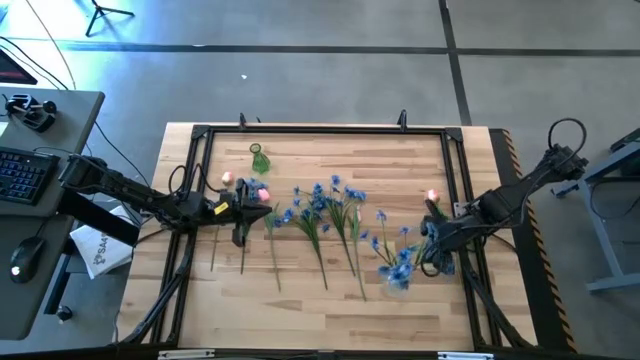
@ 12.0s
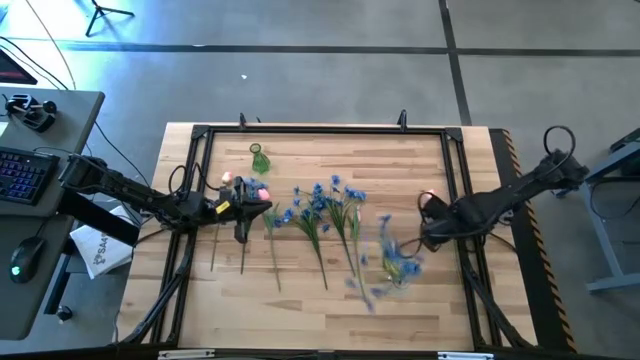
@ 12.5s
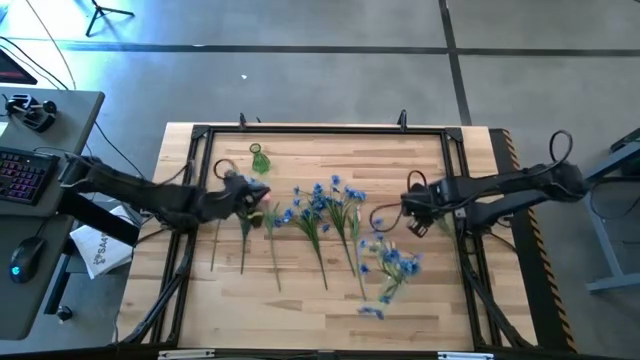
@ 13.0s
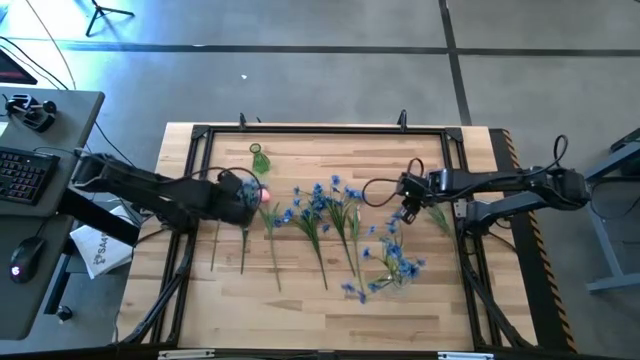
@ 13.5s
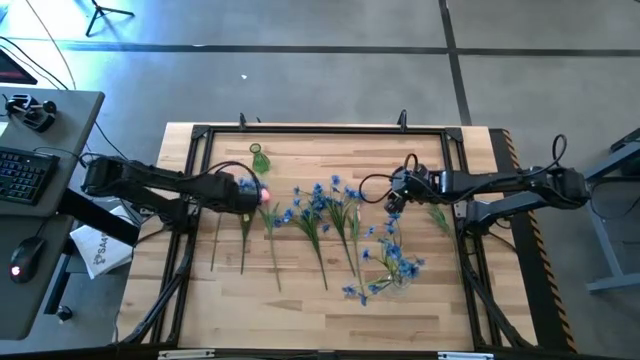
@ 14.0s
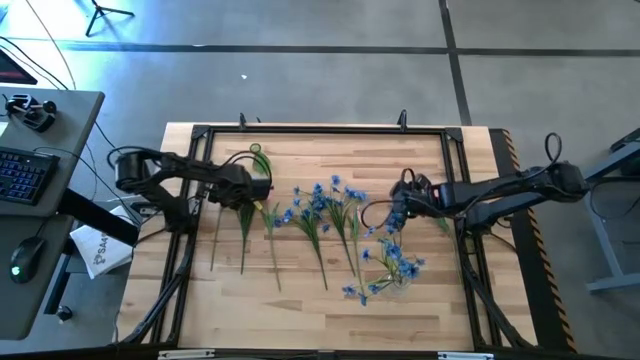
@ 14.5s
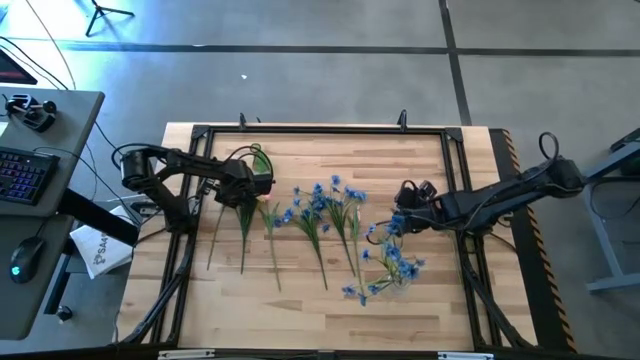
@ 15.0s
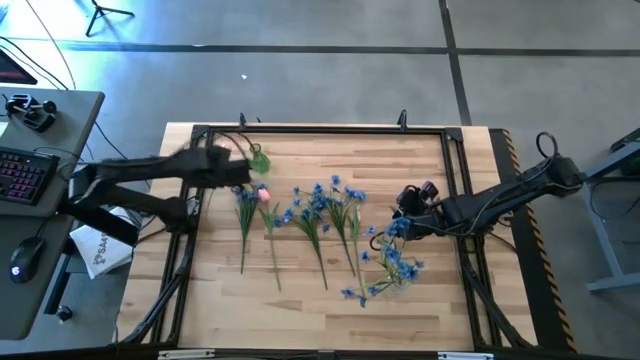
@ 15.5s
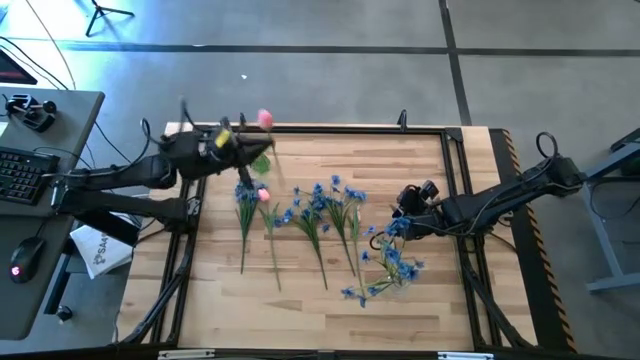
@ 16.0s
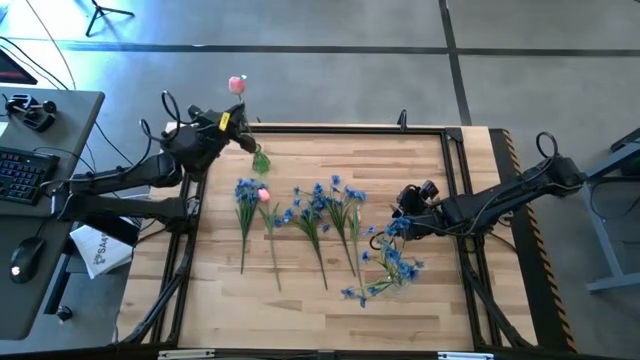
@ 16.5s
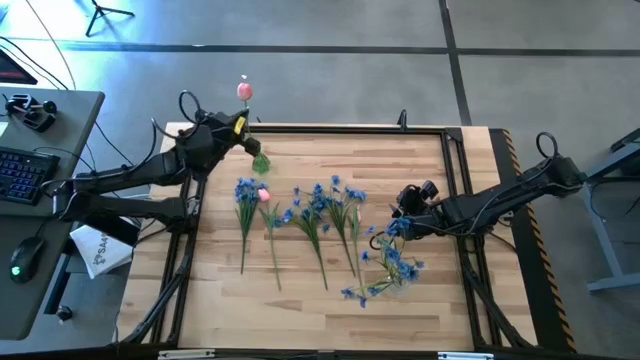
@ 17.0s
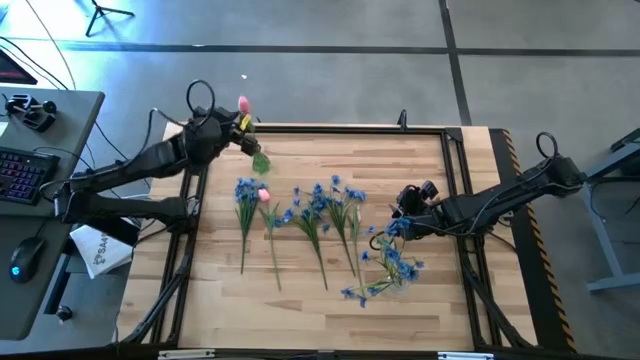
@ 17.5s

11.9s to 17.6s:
Task: Sort flowers into vase by color
Put the left pink tulip into the green vase

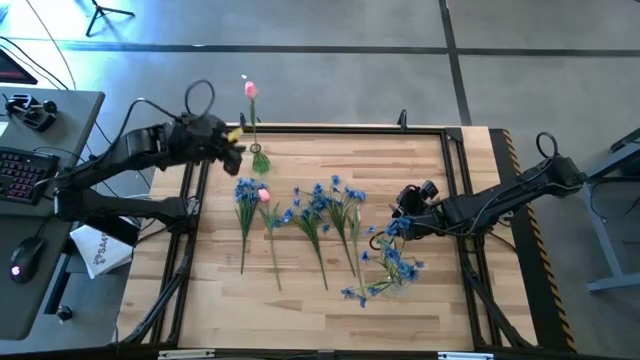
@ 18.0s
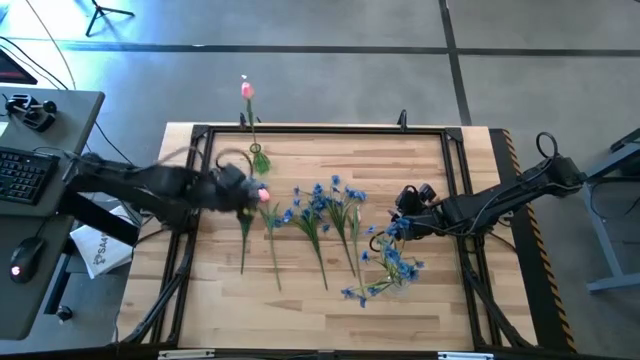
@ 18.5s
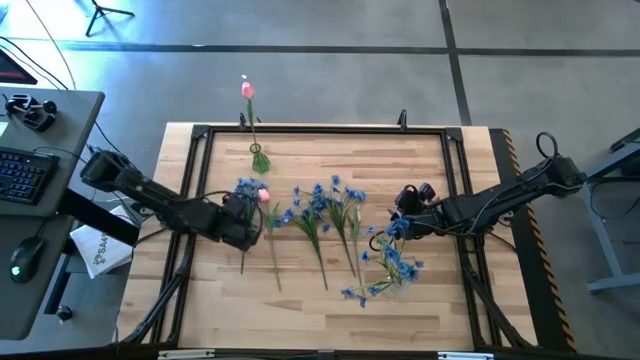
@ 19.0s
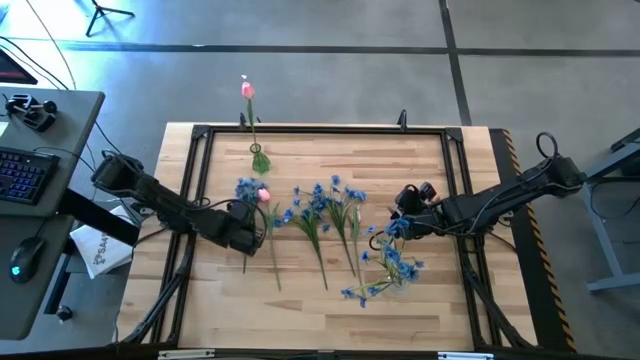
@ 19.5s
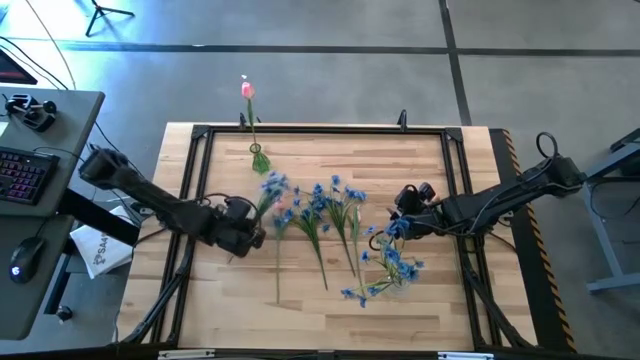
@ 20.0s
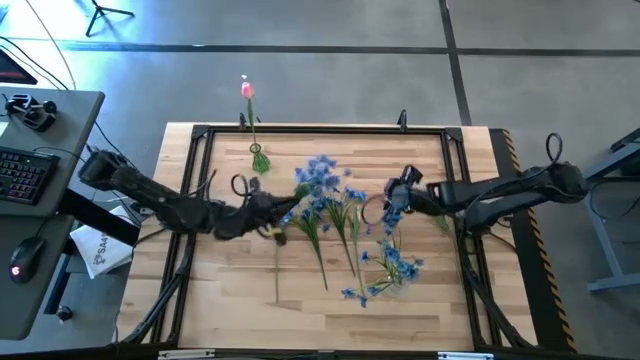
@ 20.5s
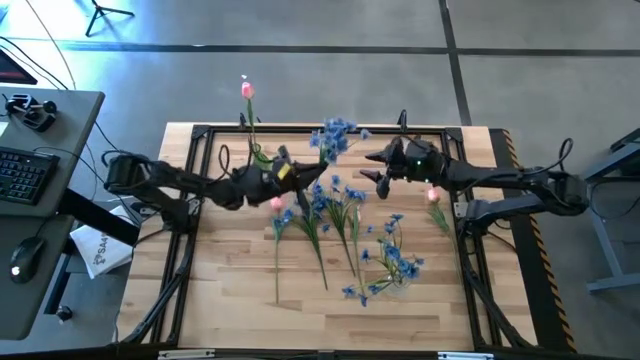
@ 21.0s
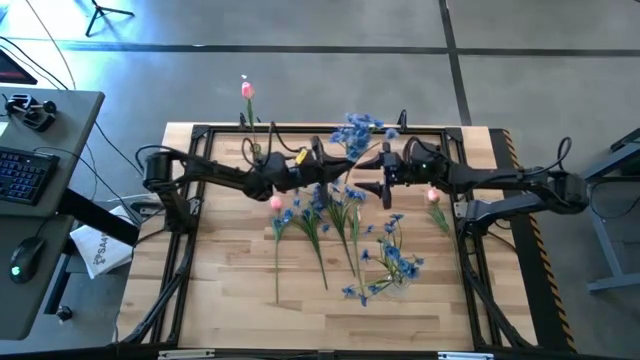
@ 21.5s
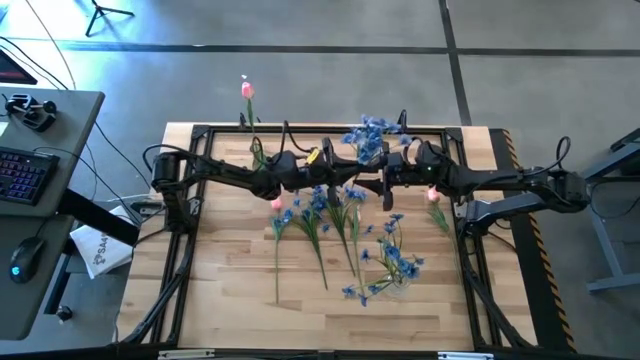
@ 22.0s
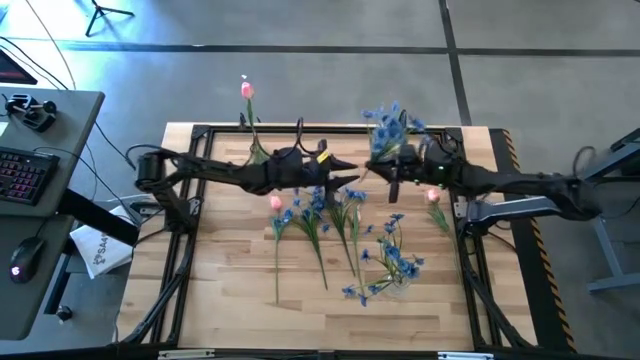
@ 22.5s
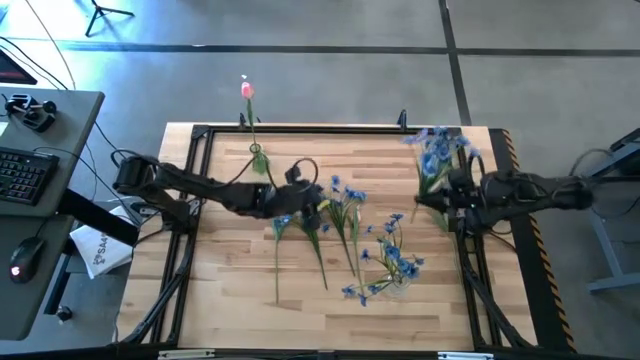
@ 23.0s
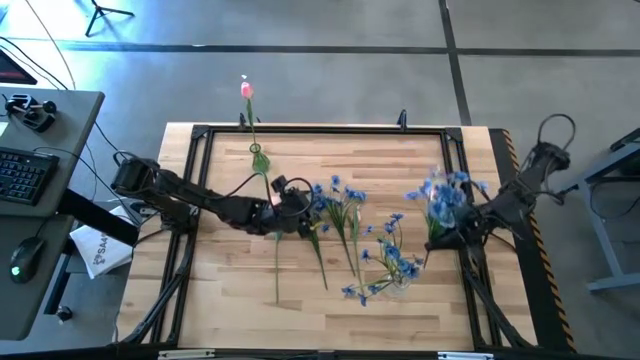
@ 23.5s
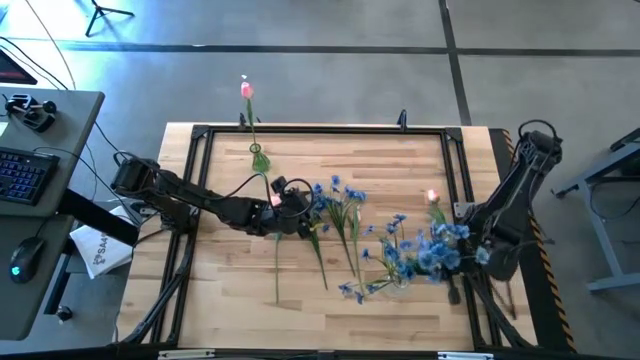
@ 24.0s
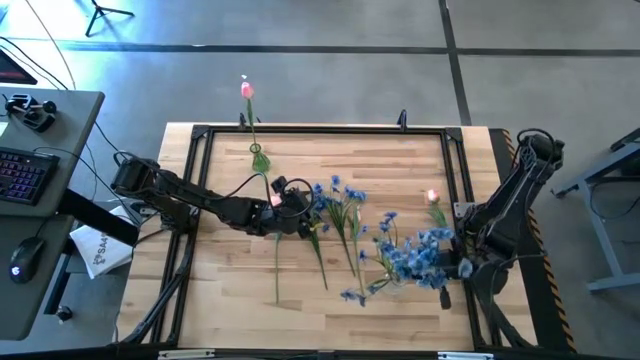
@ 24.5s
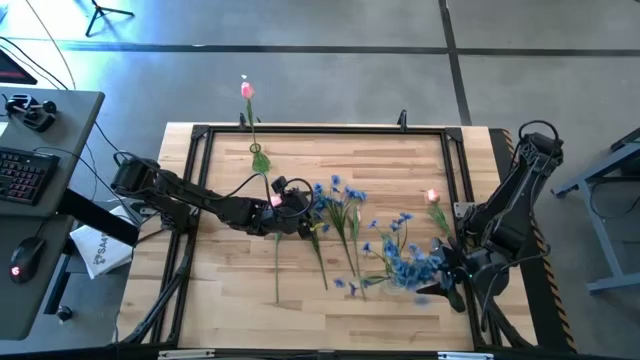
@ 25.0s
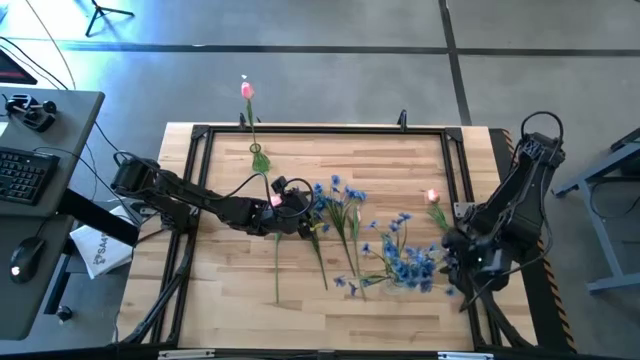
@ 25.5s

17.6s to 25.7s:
Put the left blue flowers into the transparent vase

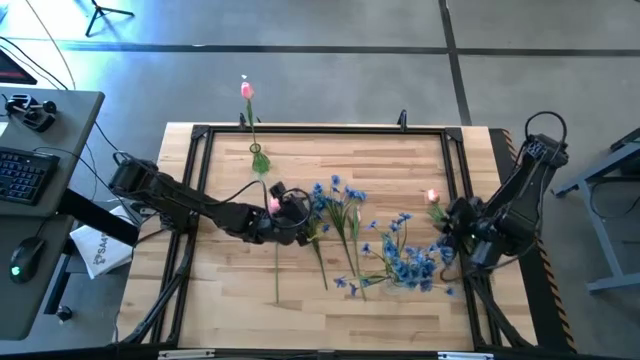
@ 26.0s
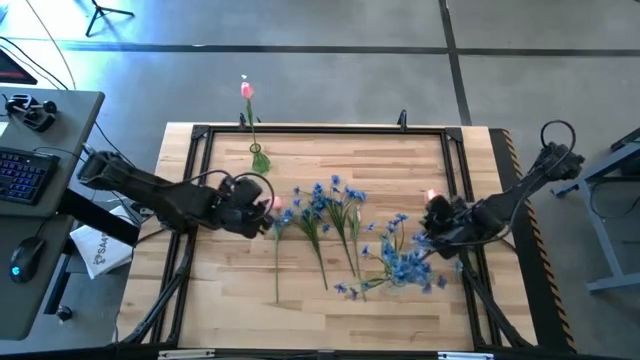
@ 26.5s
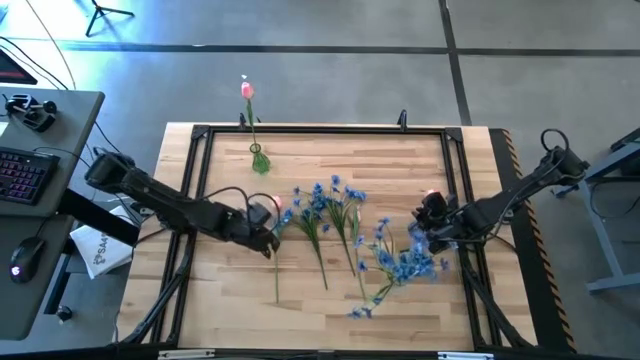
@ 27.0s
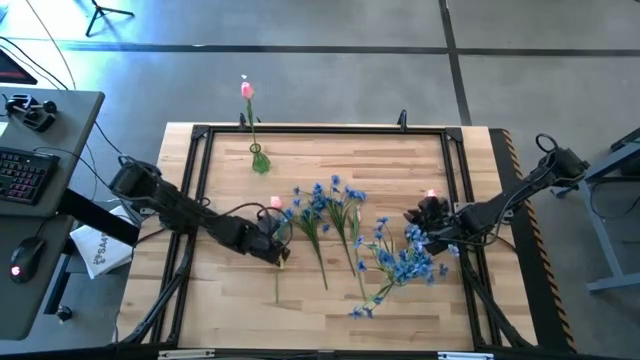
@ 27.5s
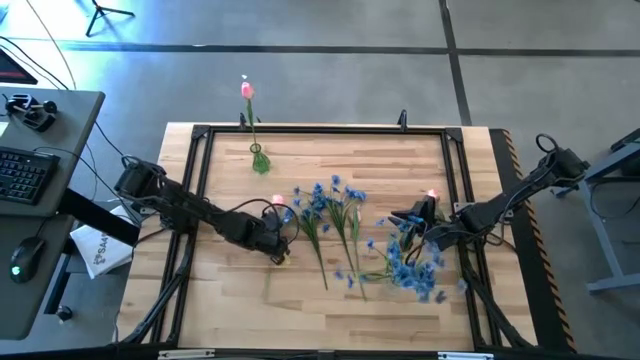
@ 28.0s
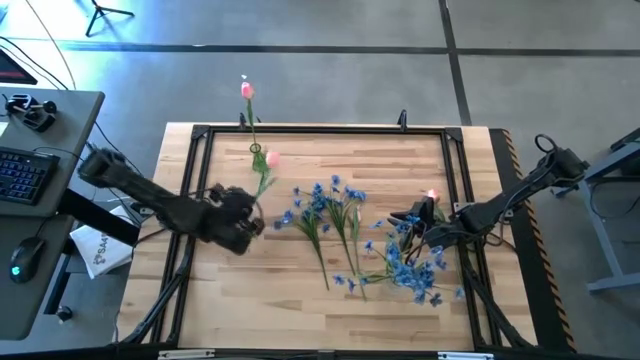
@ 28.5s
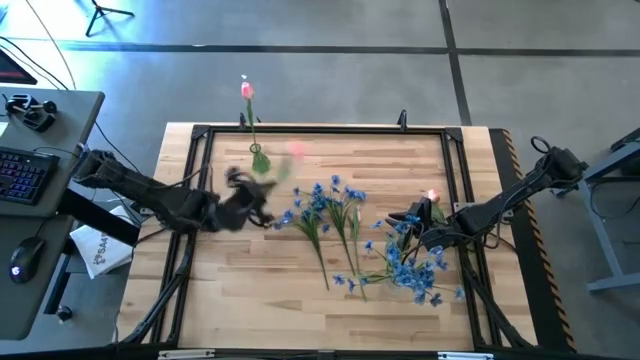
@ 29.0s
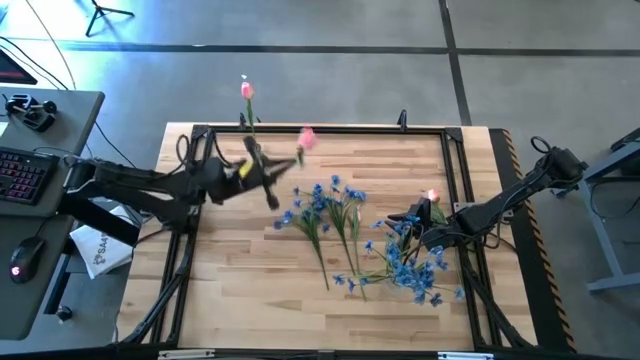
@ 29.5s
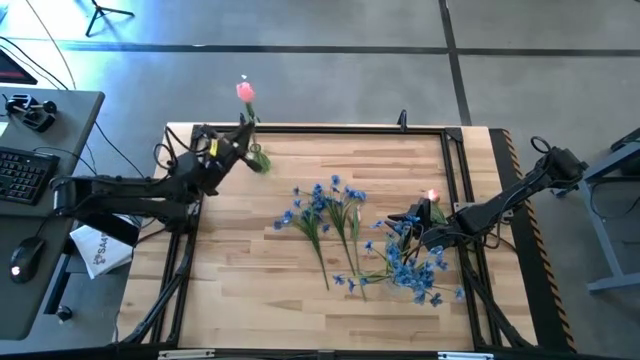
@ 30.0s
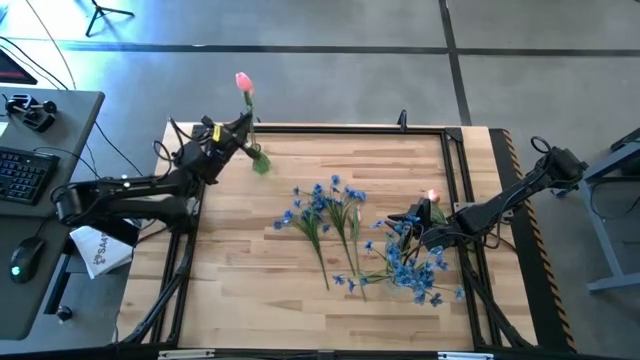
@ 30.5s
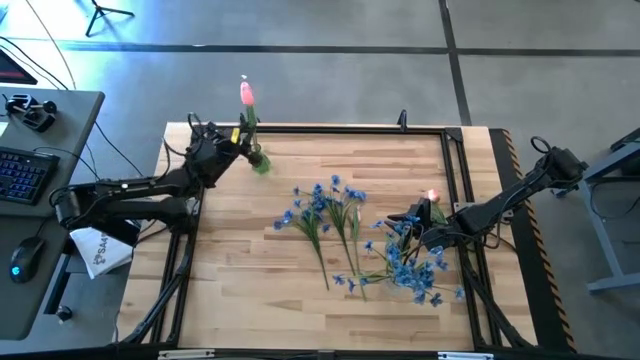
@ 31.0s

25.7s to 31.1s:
Put the left pink tulip into the green vase

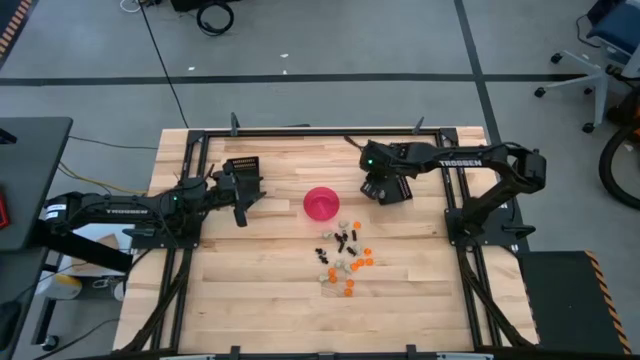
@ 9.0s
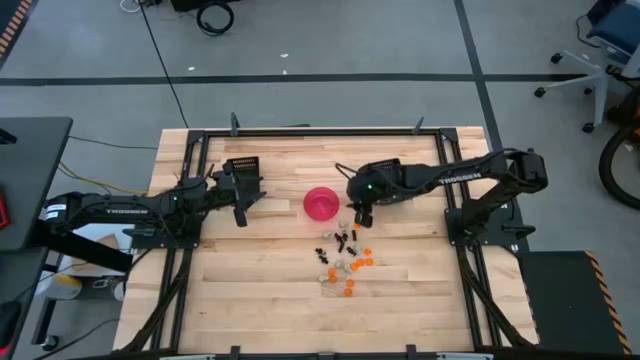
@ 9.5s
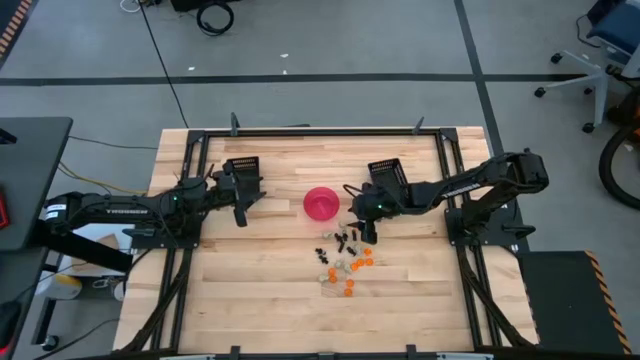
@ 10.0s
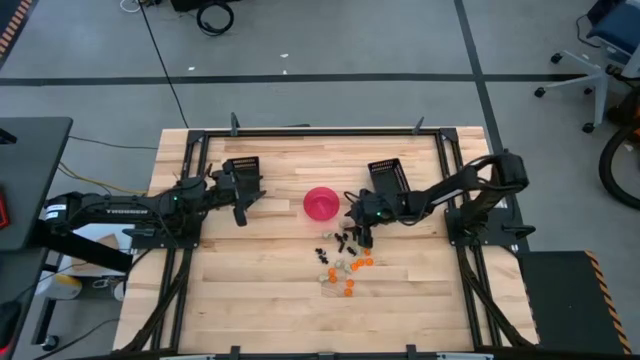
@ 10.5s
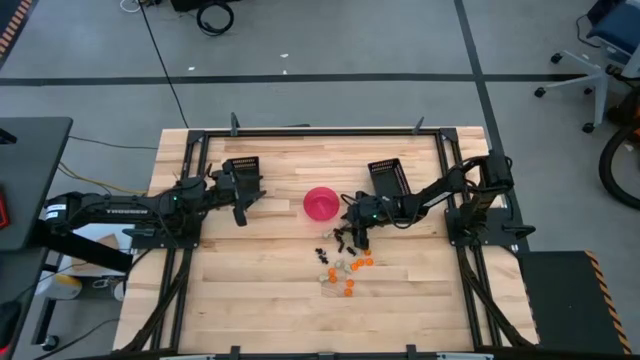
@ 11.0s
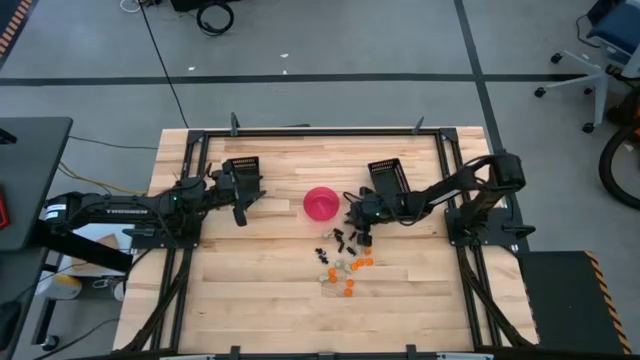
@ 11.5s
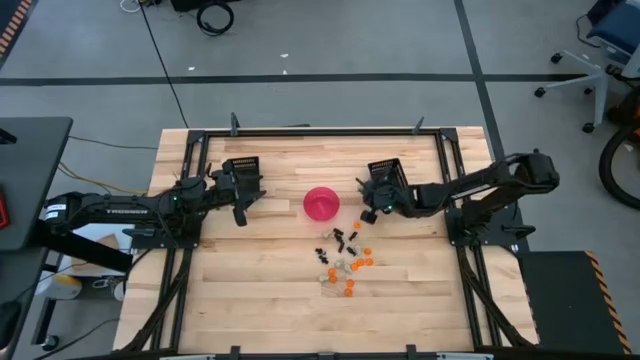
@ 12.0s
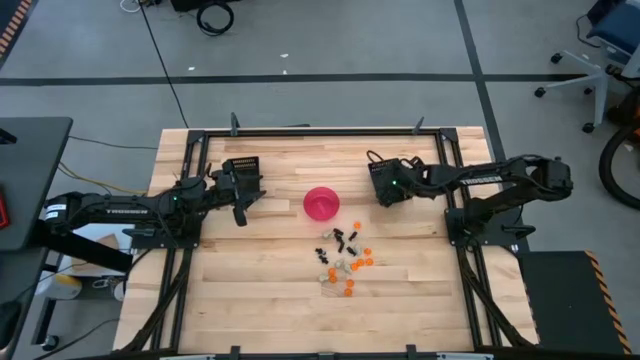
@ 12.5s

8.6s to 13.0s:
Task: Sort Halloween decoration
Put the white skull toy into the right black bin
